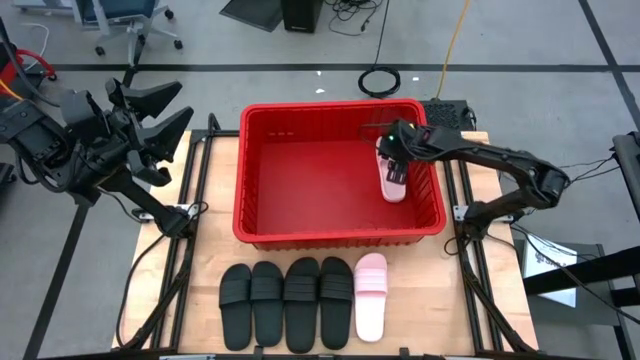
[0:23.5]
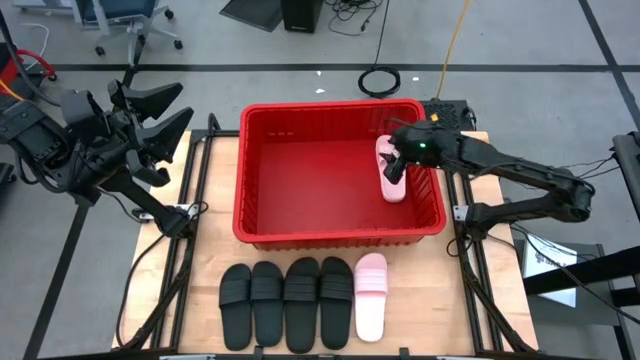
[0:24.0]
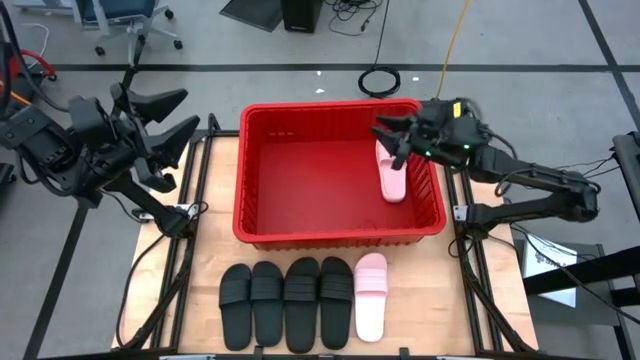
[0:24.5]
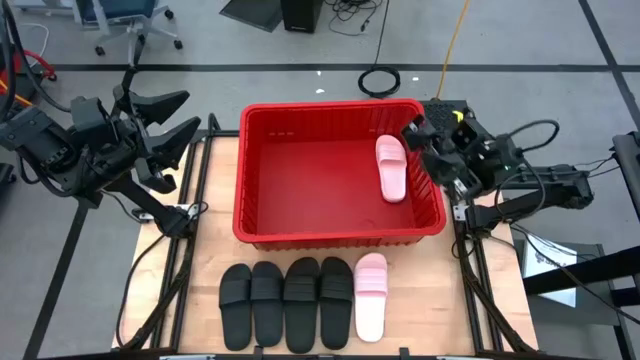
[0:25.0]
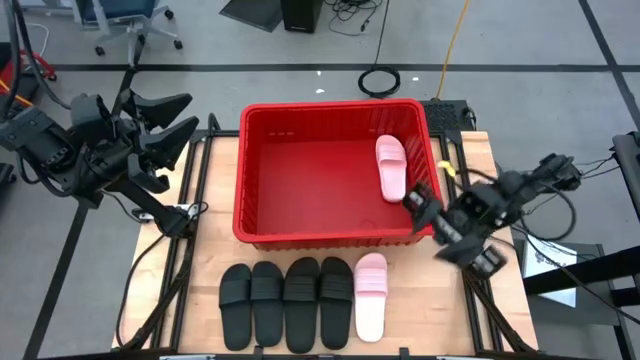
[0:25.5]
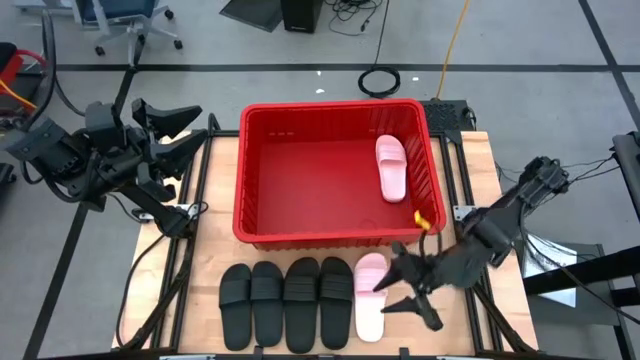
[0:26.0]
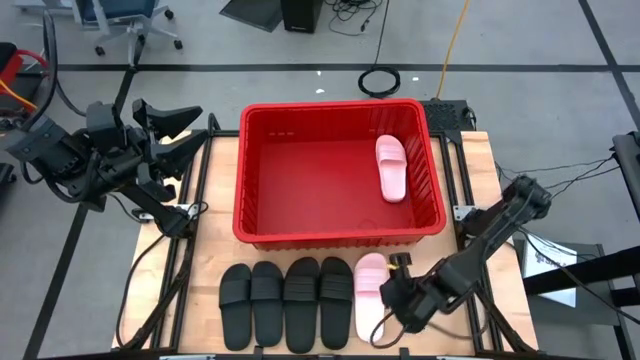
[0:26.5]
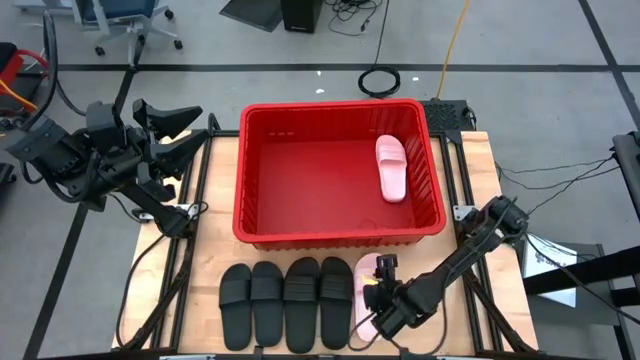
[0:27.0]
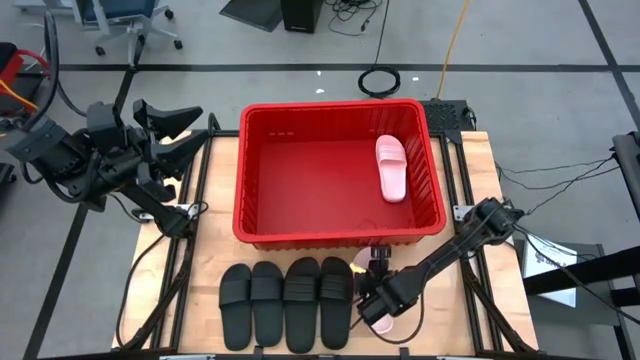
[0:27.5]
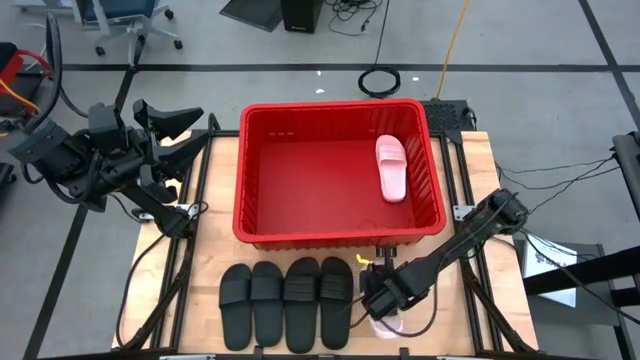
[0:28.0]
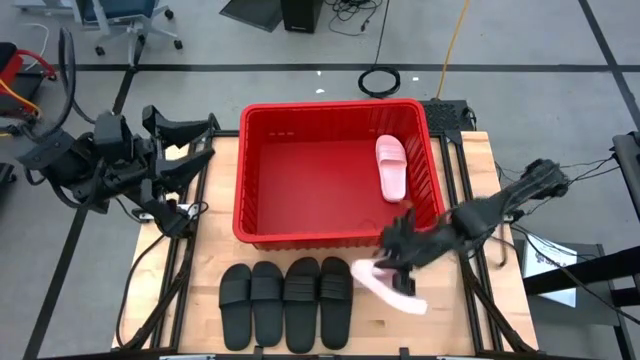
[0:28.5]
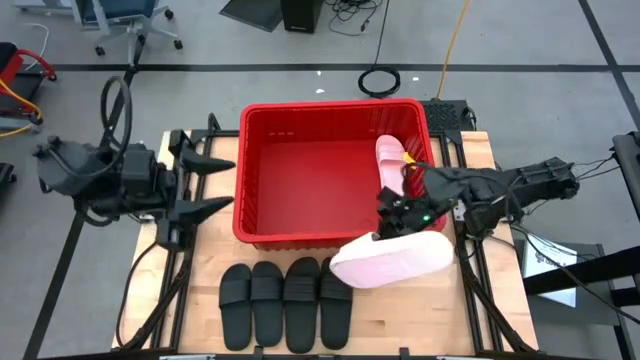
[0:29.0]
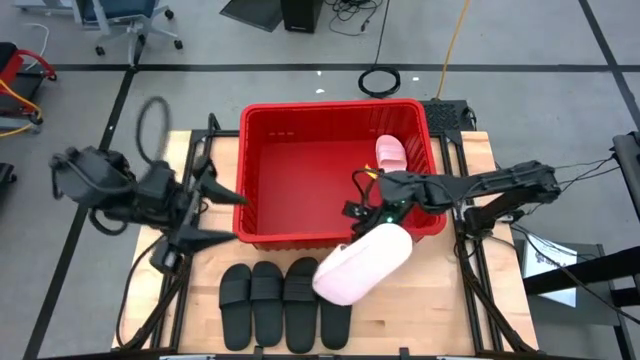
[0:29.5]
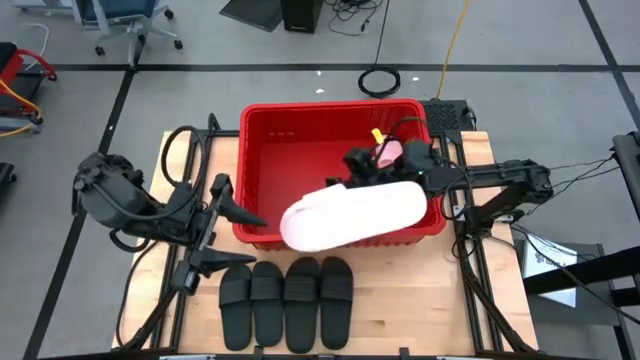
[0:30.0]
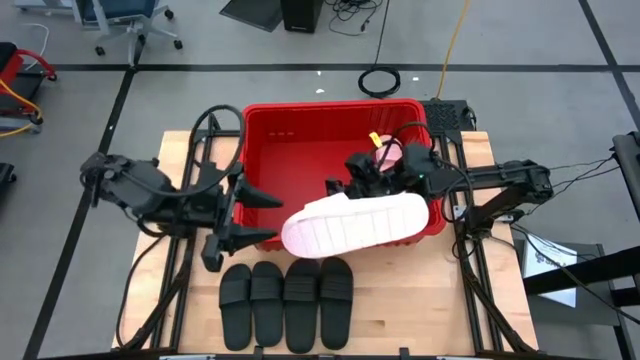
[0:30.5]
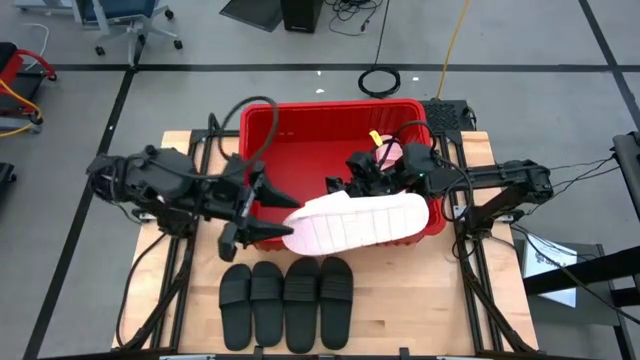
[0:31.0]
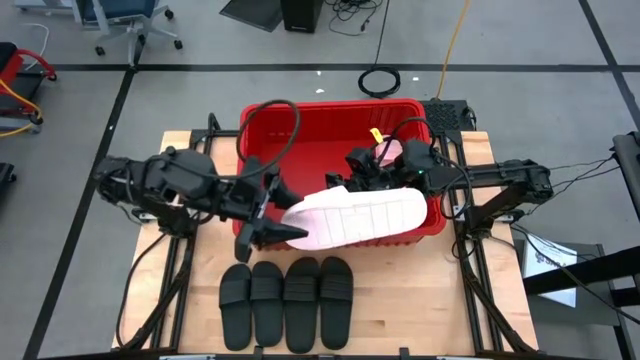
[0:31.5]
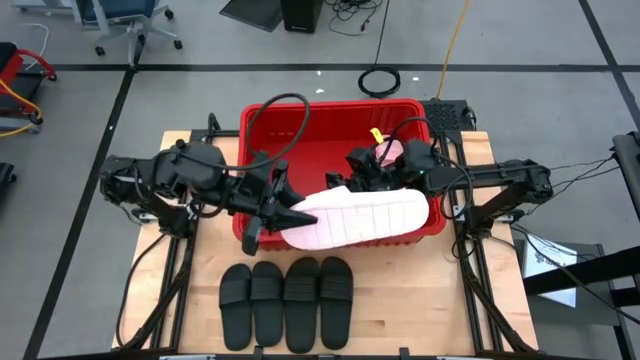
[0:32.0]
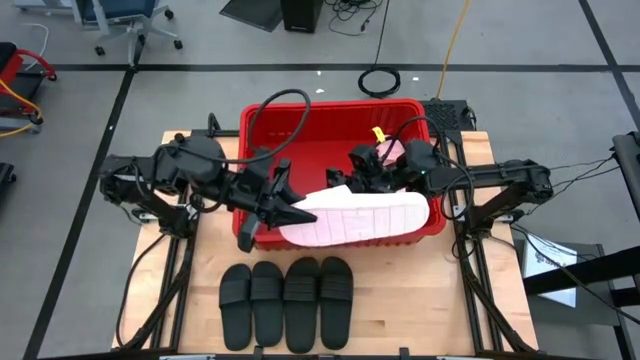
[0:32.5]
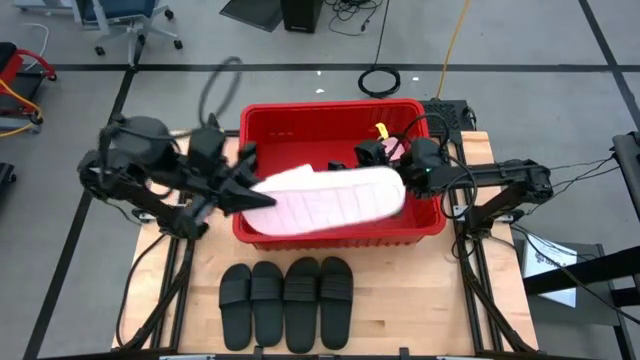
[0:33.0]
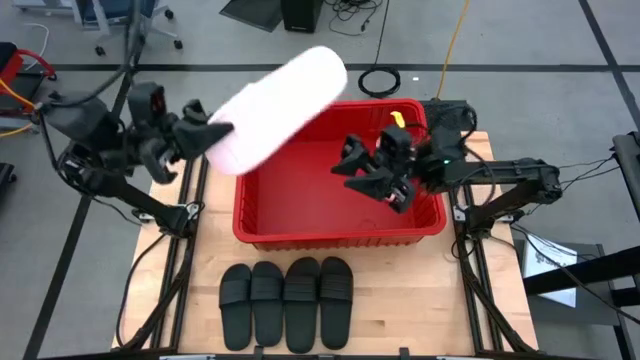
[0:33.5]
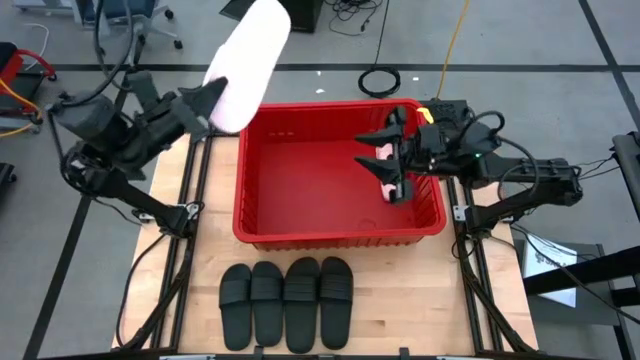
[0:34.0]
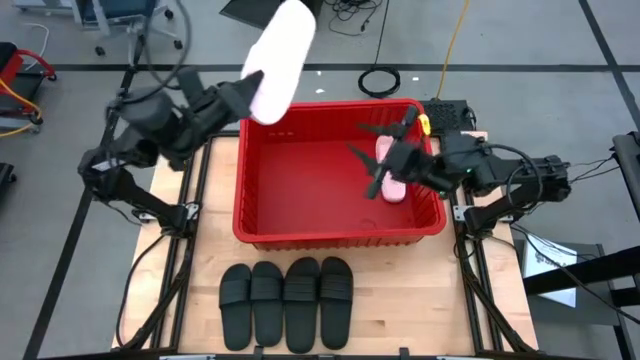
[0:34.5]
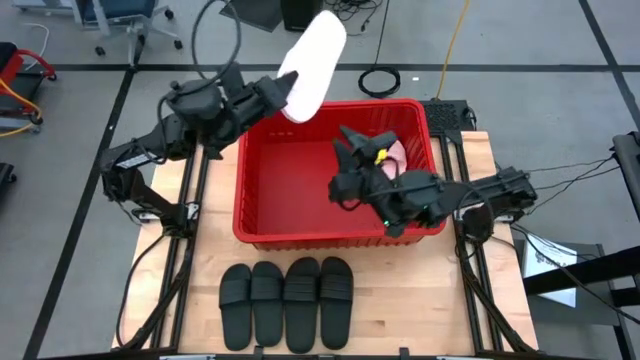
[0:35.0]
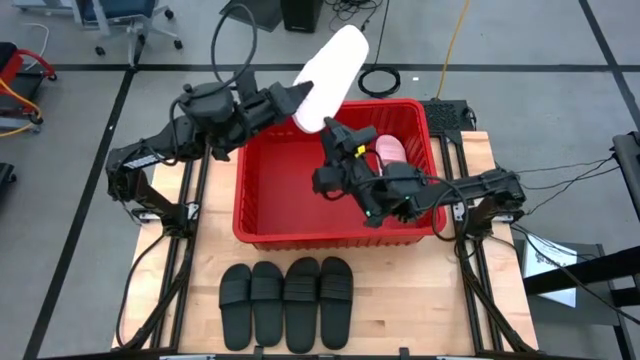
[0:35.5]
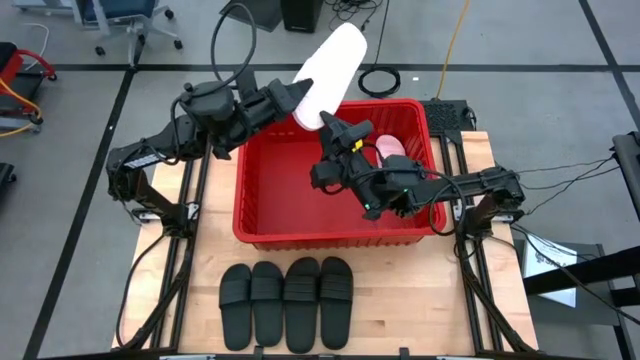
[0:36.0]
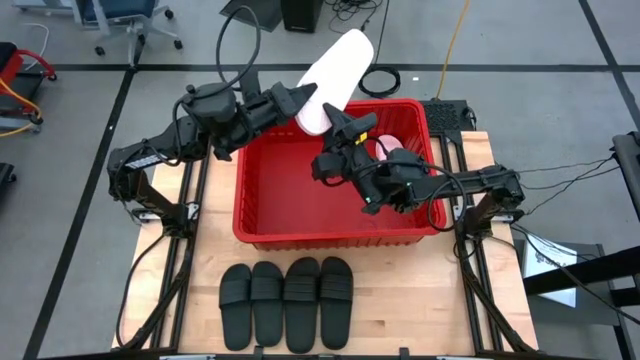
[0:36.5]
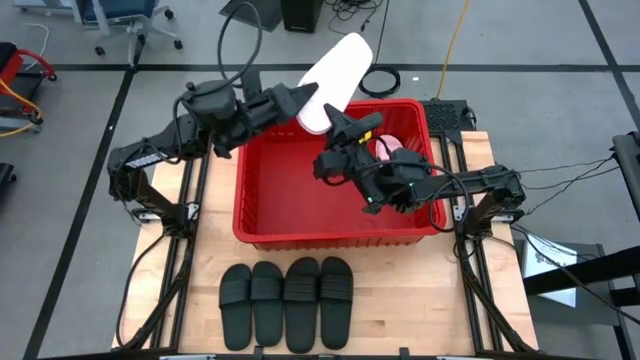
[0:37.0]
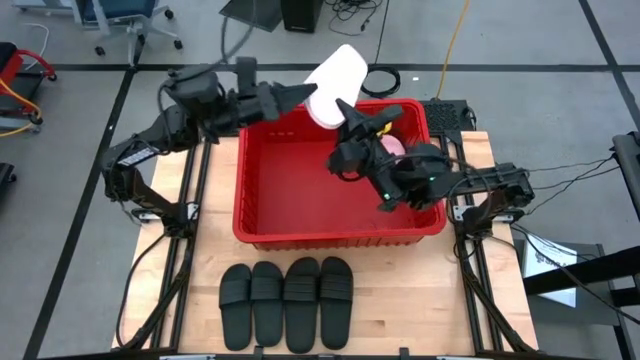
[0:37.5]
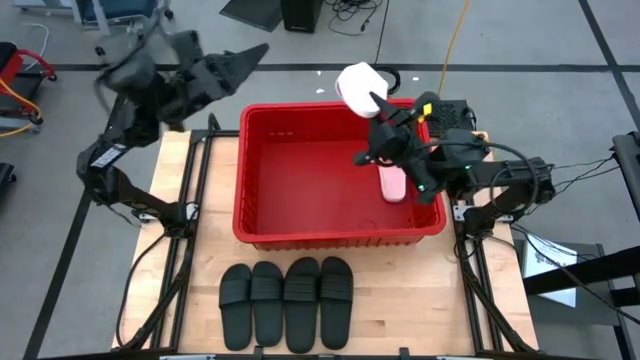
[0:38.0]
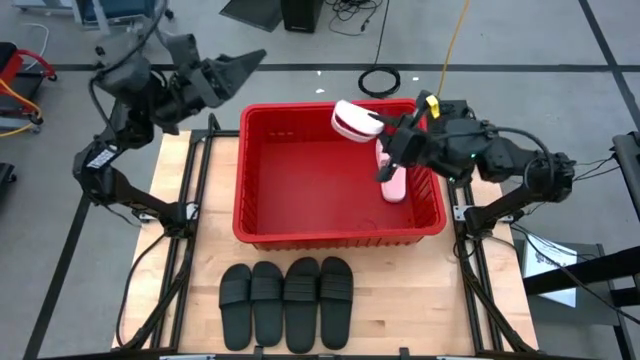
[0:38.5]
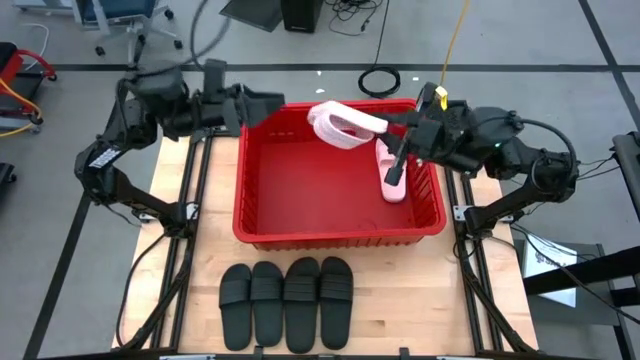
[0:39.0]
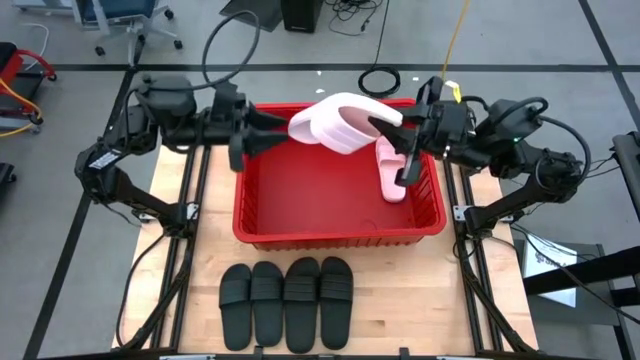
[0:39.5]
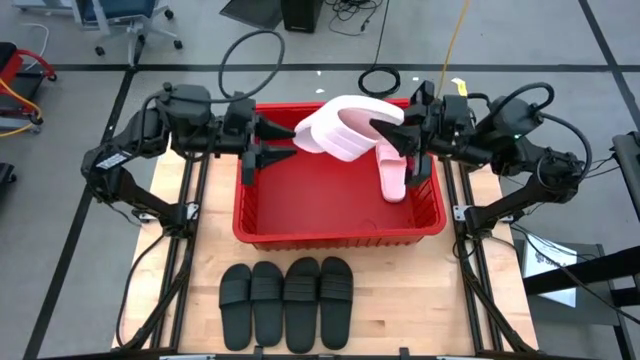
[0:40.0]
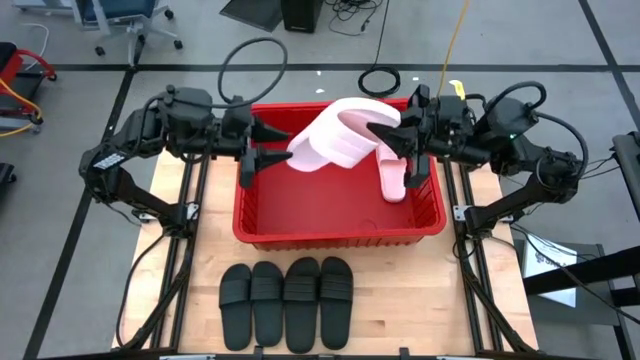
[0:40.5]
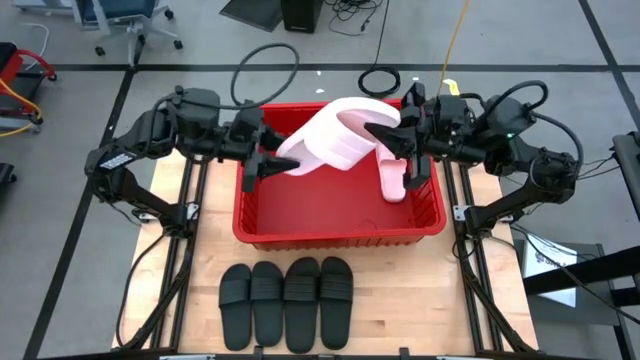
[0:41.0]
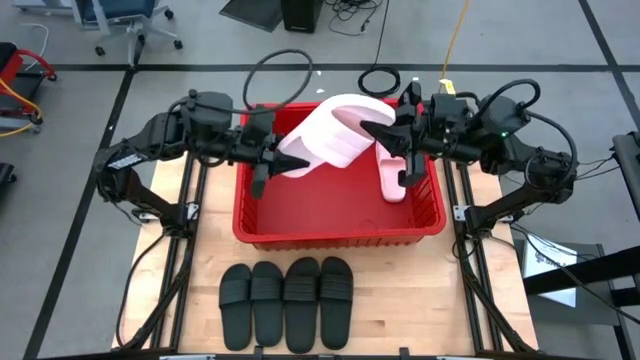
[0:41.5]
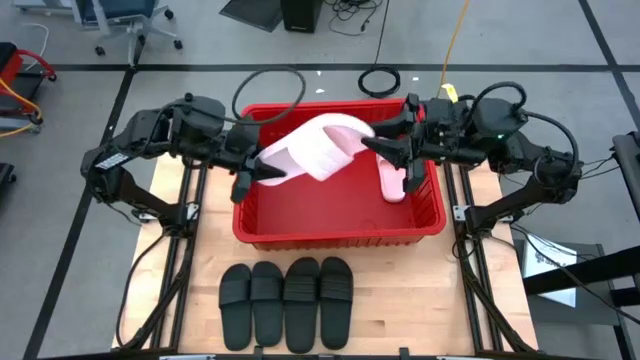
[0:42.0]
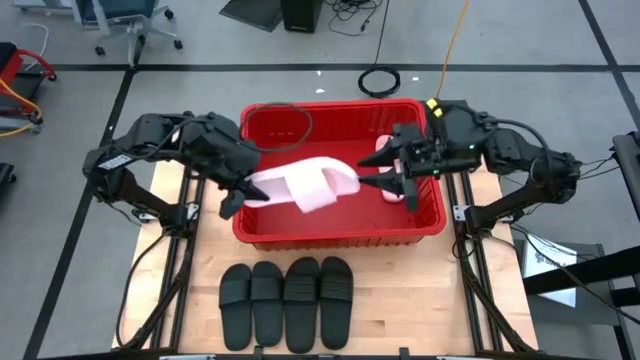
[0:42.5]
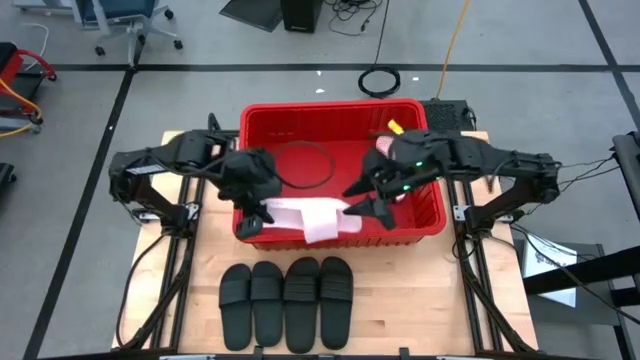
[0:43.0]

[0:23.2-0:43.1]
Task: Pick and place slides into bin
Stack the pink slide on top of the pink slide in the red bin
